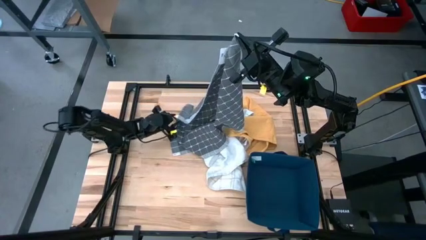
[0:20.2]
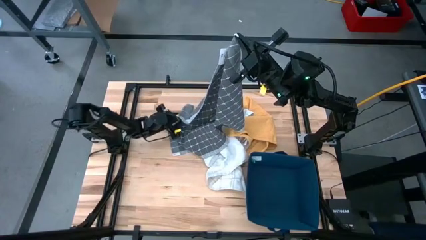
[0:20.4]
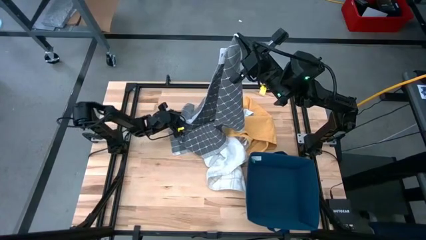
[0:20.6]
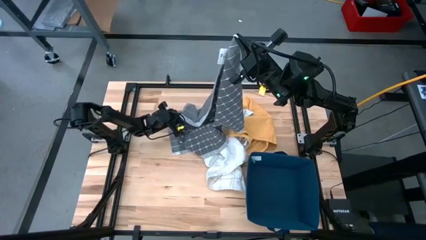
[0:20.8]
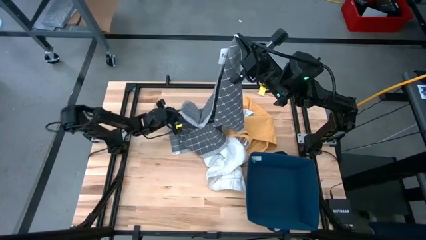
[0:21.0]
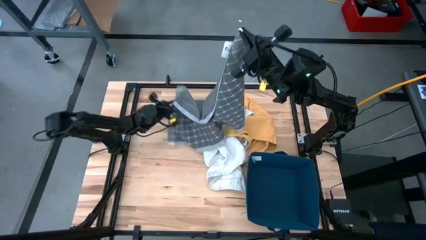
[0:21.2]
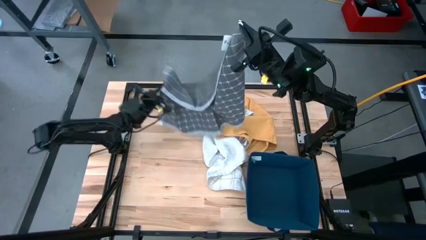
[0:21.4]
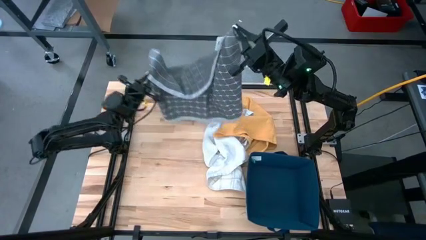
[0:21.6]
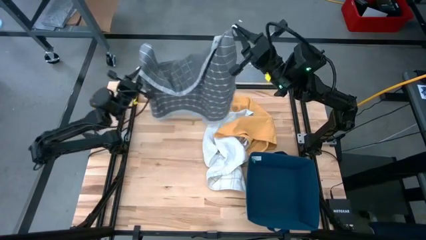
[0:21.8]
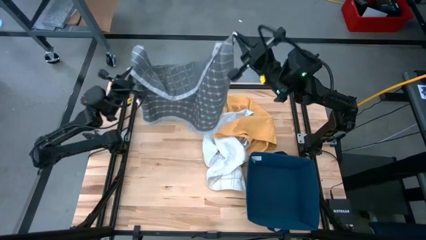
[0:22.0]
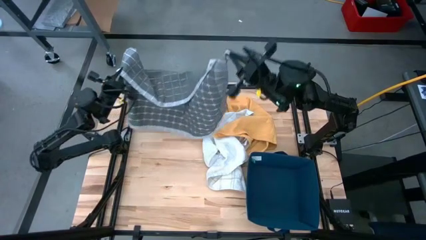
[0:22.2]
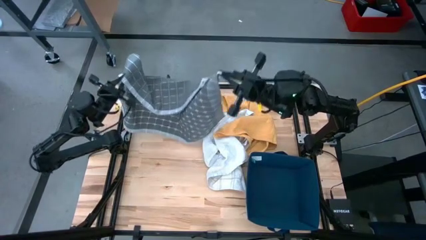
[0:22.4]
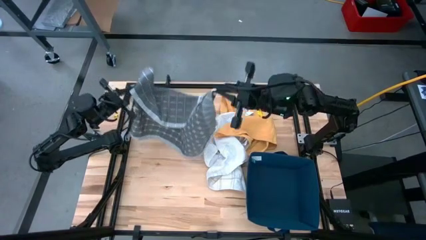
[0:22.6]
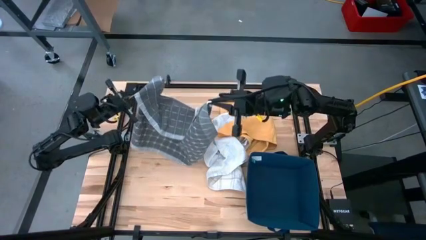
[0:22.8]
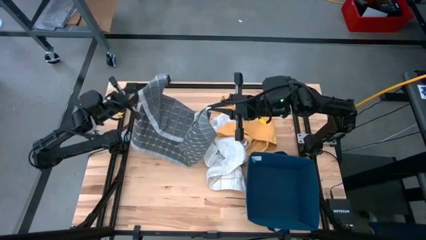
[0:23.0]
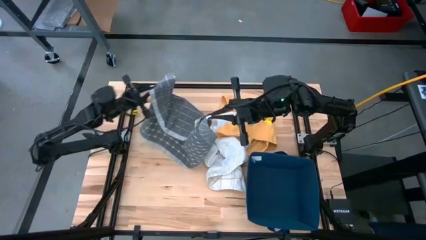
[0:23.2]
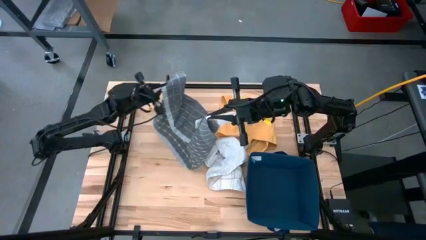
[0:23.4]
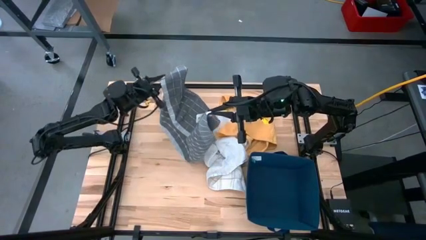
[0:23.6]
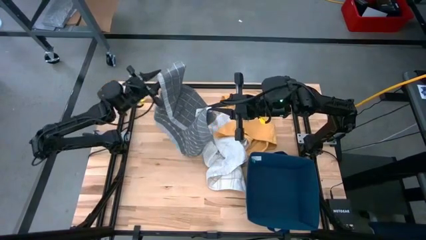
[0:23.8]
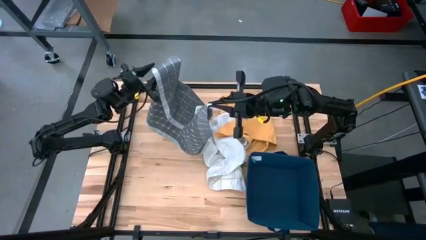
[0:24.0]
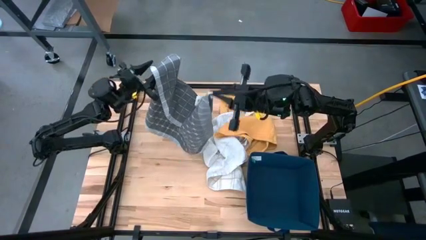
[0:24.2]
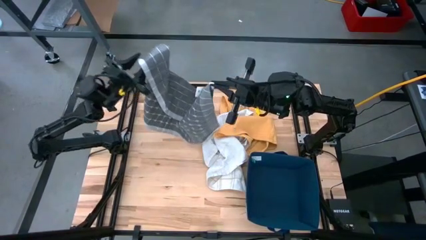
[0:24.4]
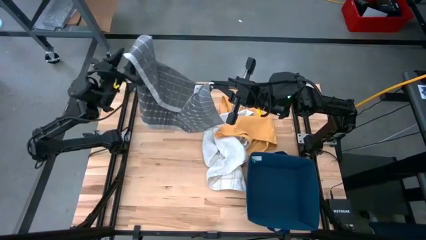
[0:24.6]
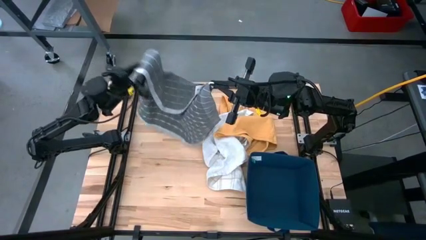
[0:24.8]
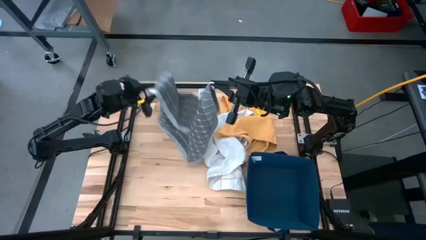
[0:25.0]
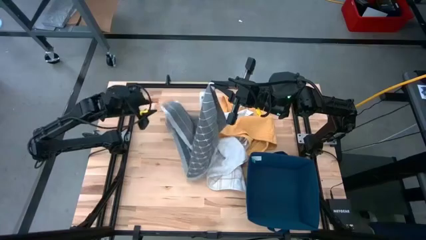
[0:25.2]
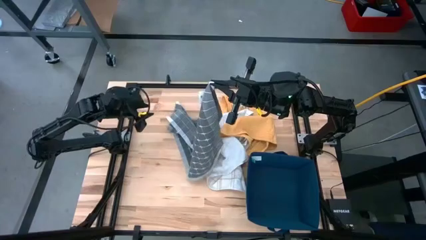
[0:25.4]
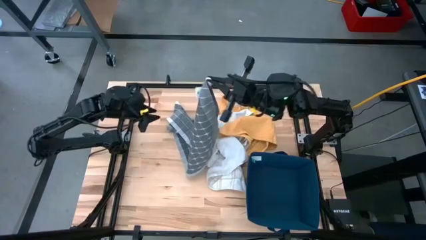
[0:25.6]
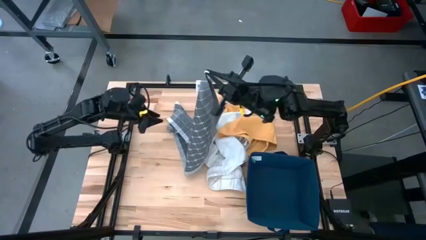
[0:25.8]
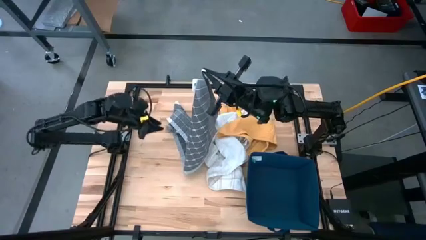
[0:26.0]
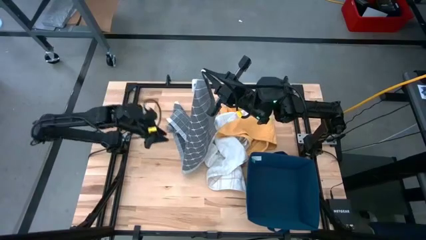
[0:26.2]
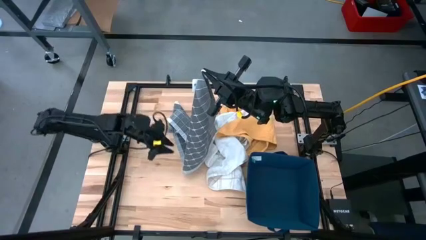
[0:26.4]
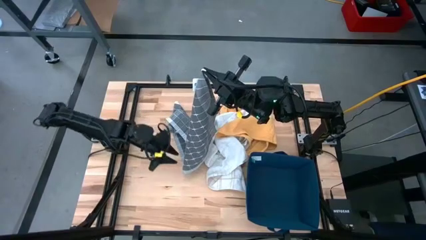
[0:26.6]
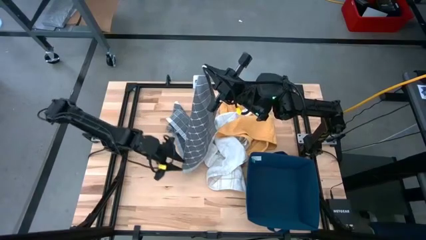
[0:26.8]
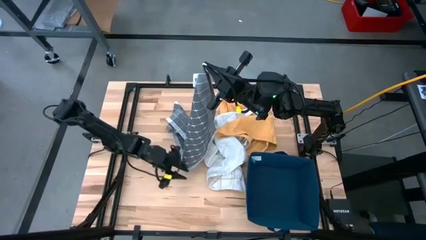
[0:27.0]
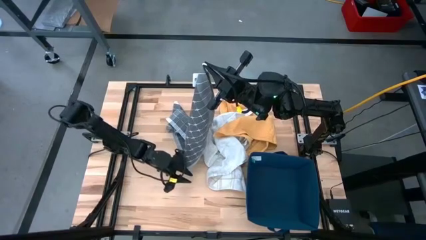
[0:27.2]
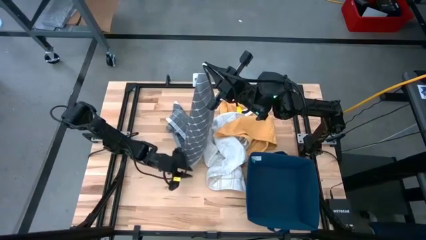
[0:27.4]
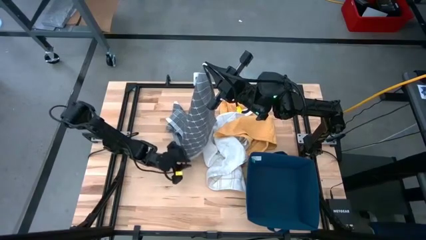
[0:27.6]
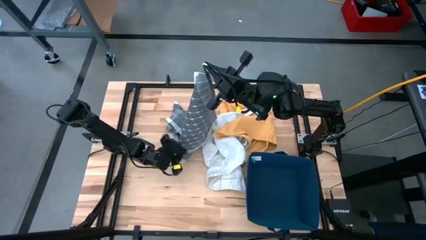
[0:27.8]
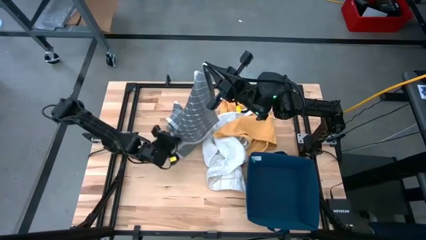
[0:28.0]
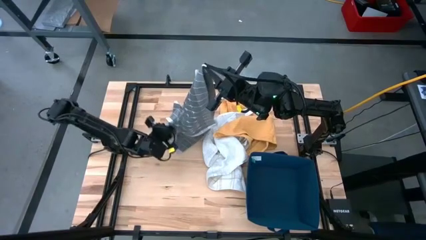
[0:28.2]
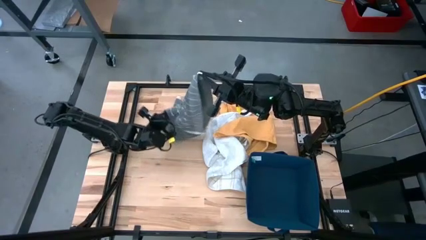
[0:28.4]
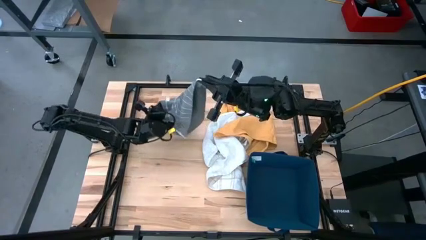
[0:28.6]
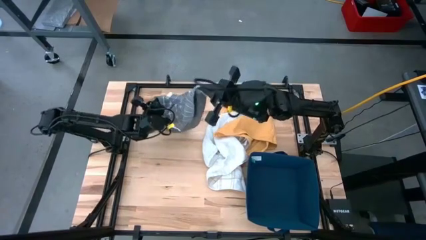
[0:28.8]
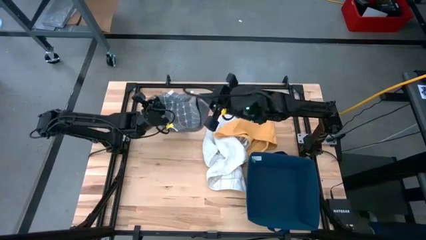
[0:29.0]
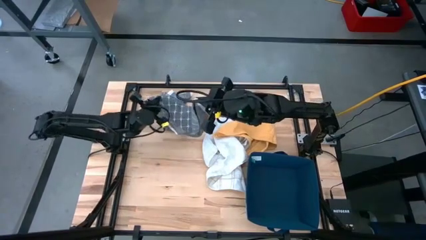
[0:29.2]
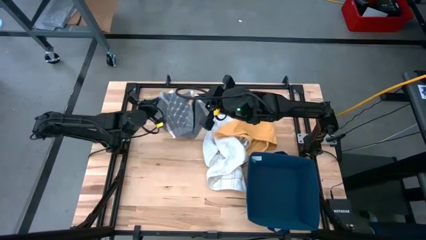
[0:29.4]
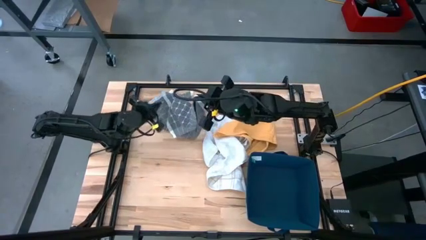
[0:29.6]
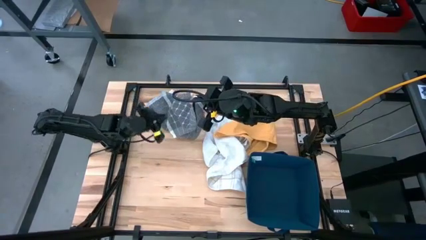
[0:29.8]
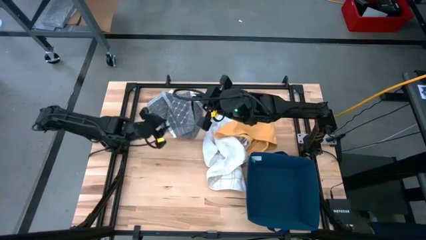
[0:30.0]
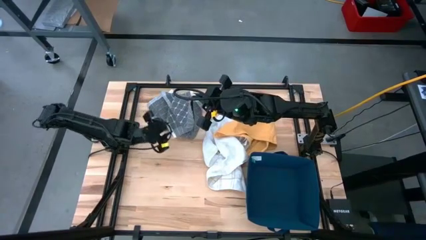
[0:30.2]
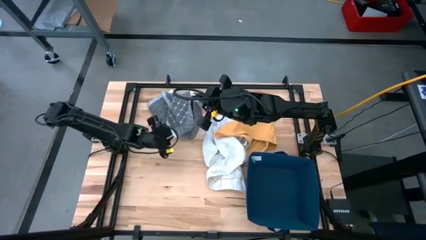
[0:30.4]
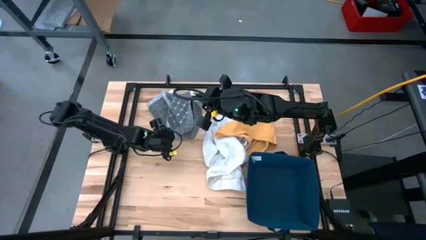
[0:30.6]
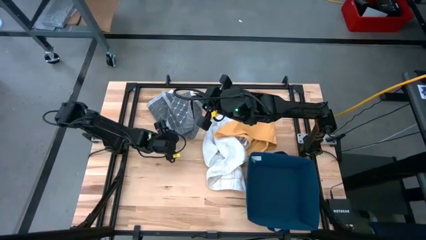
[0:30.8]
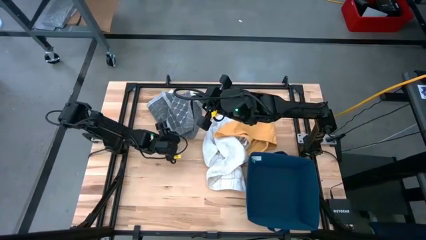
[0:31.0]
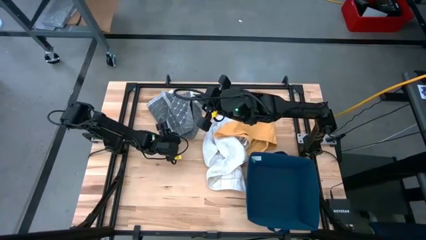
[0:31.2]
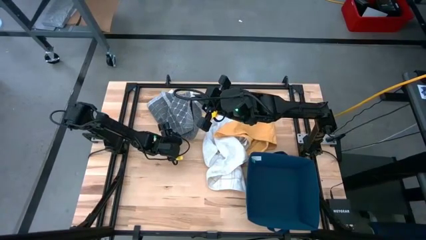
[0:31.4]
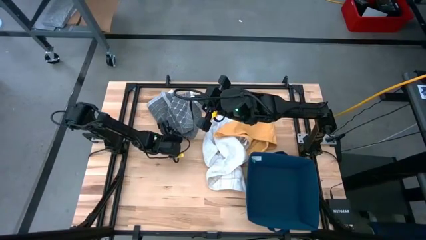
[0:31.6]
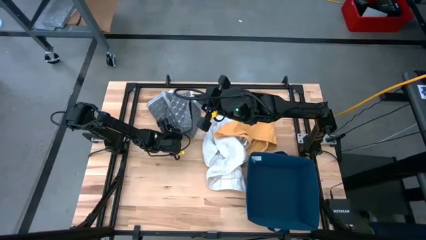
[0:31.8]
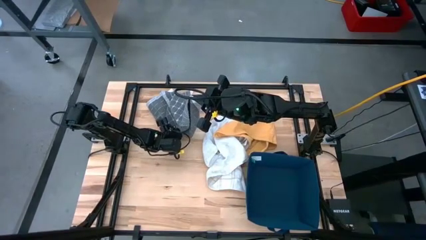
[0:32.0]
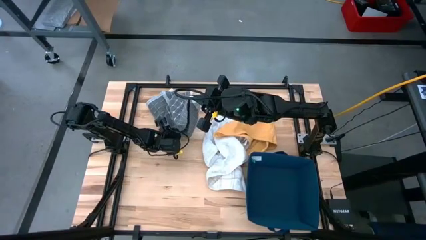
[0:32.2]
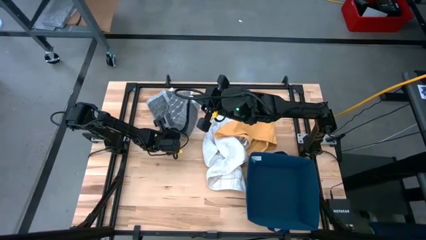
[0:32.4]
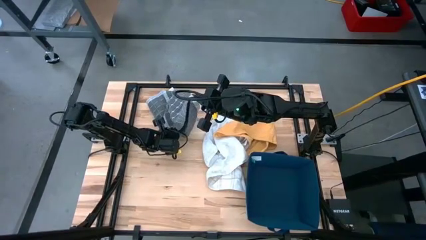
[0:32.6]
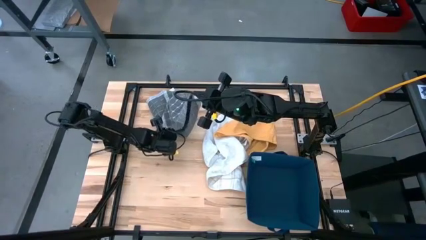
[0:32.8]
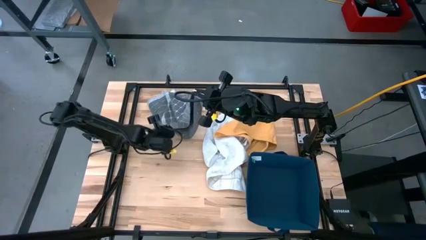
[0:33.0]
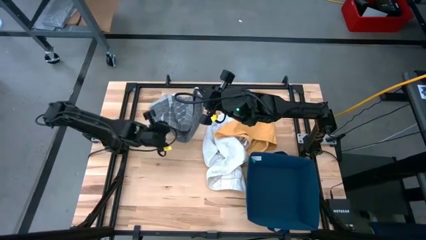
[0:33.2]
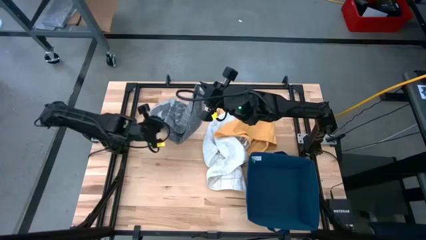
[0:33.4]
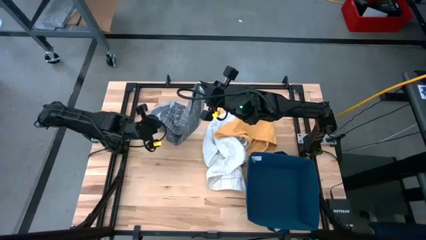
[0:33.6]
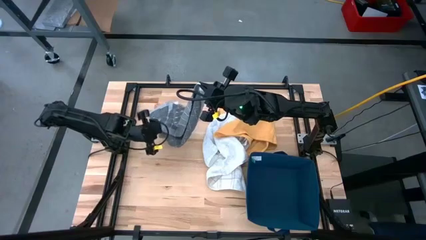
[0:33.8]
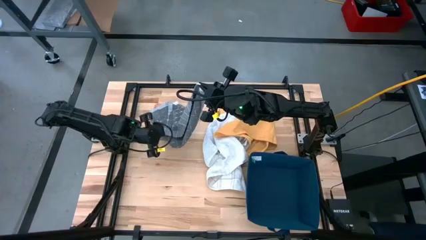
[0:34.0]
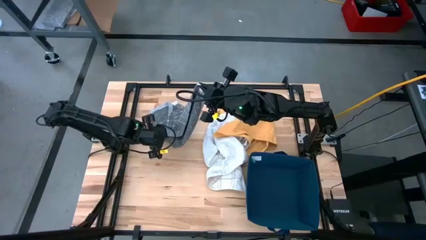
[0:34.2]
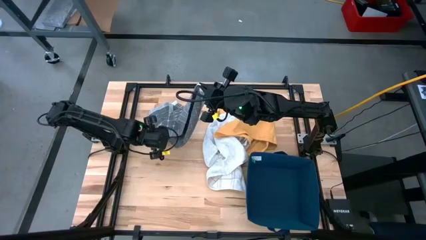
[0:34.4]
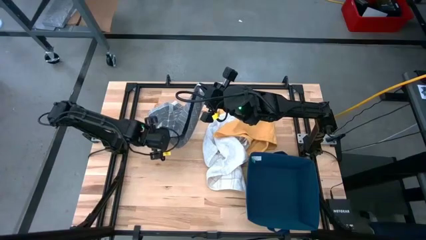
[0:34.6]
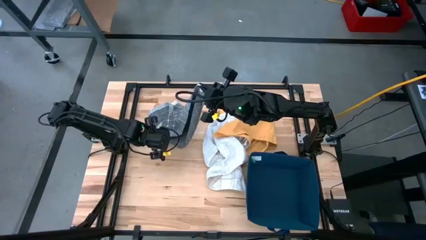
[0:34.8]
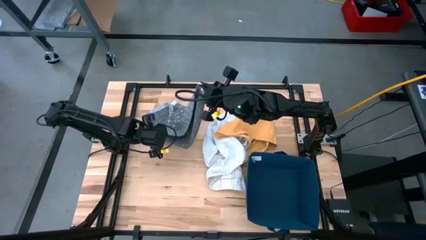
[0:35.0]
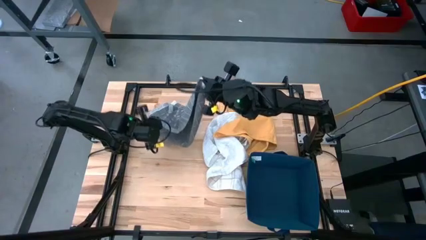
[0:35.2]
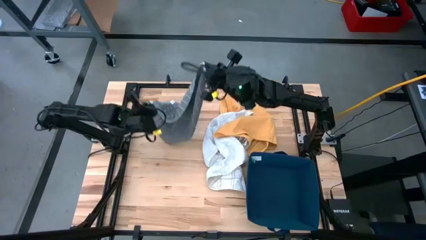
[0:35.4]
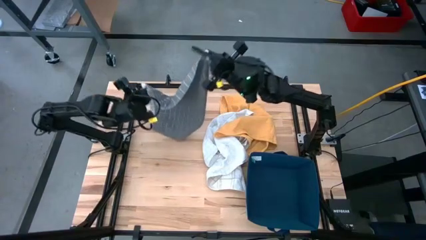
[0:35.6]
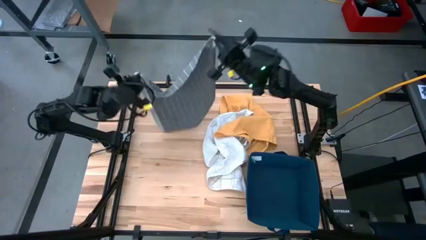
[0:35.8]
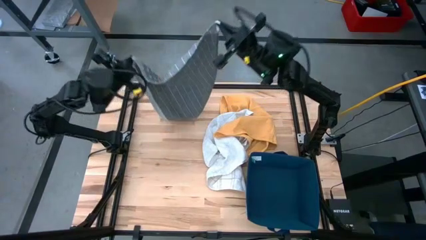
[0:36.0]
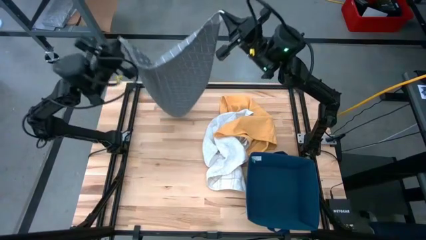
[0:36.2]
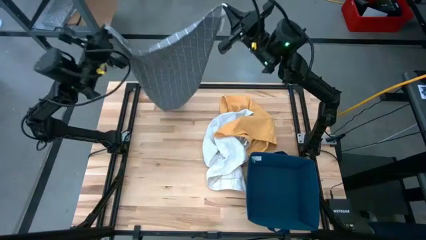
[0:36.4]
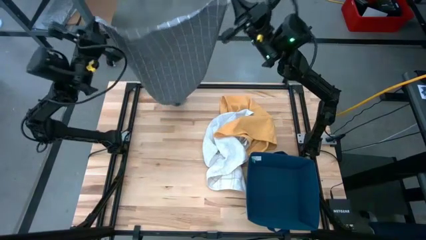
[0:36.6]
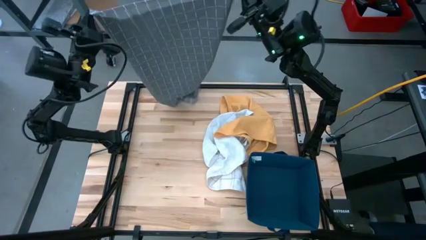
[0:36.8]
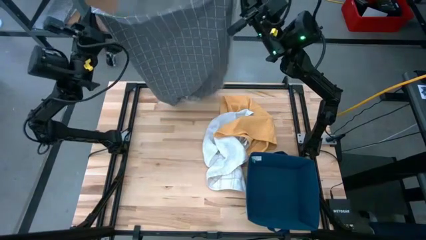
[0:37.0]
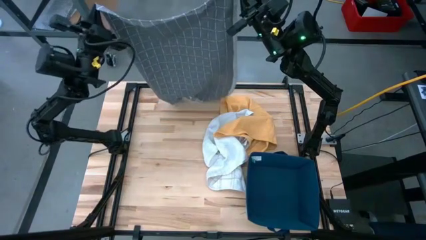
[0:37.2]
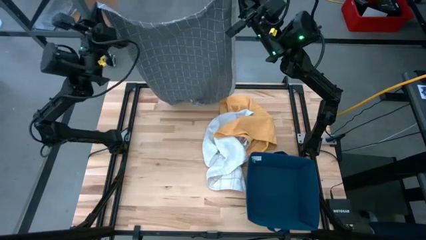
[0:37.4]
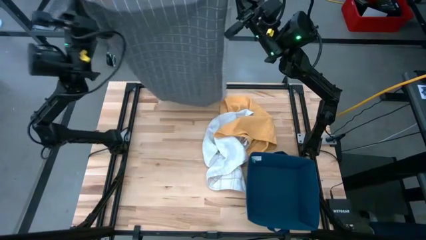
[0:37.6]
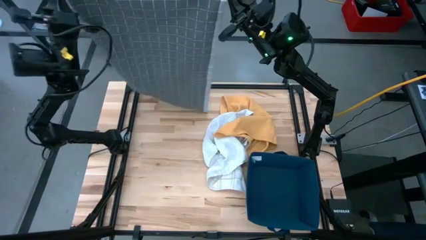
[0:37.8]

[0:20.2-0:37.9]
Task: Fold towel
Fold the gray towel
